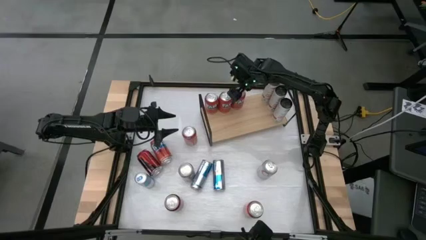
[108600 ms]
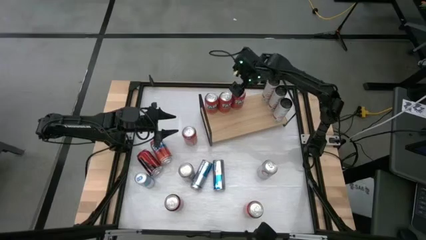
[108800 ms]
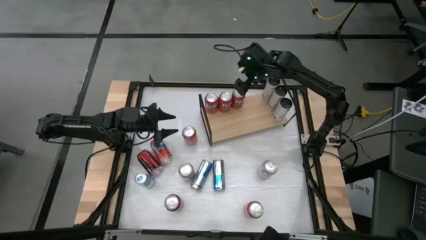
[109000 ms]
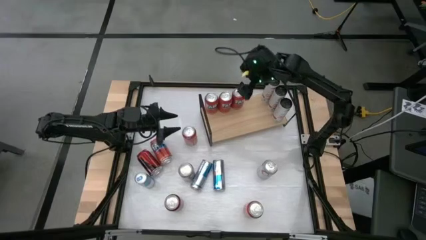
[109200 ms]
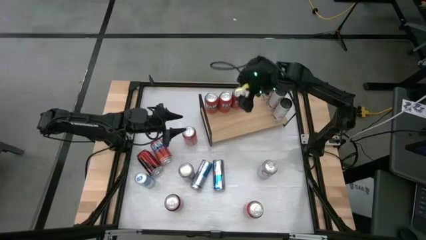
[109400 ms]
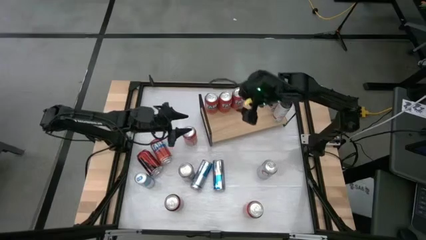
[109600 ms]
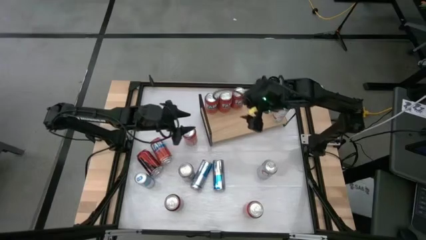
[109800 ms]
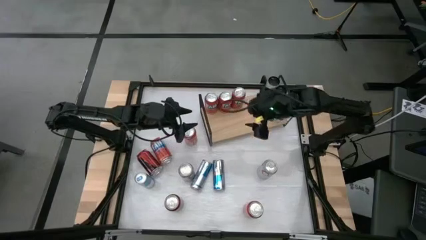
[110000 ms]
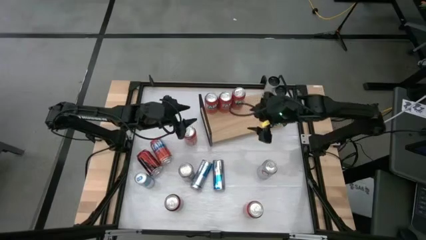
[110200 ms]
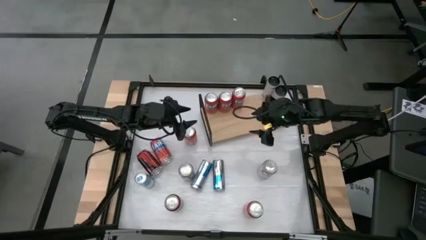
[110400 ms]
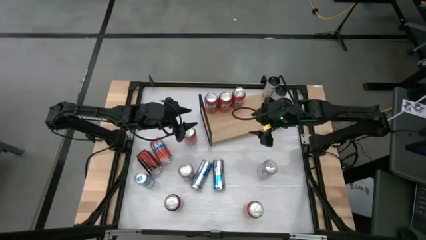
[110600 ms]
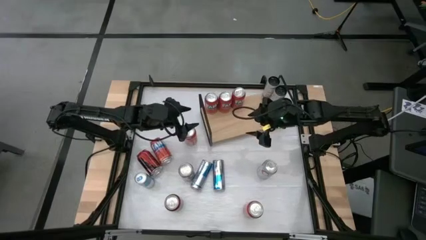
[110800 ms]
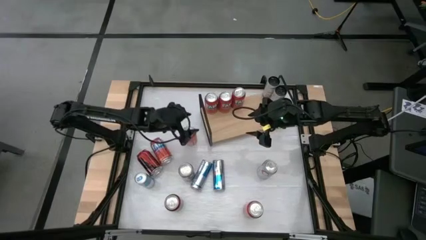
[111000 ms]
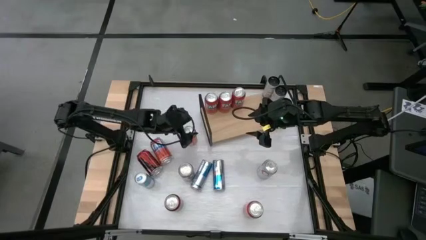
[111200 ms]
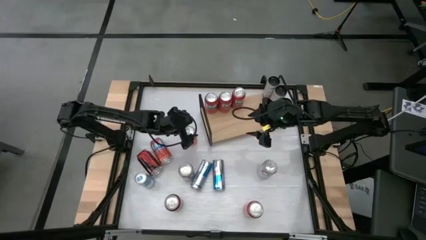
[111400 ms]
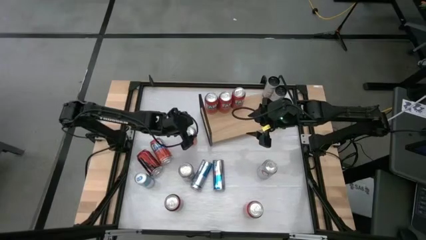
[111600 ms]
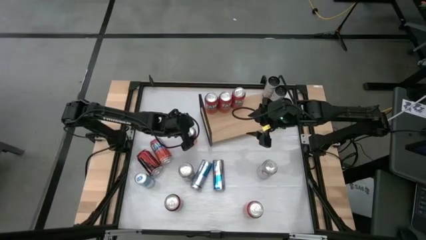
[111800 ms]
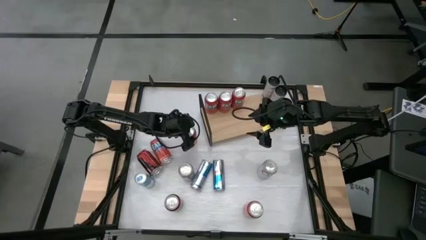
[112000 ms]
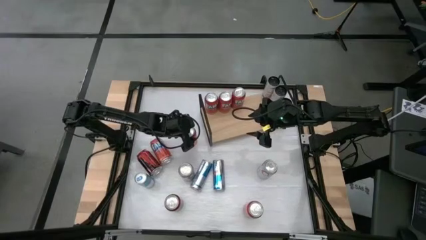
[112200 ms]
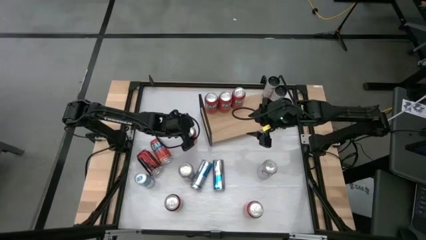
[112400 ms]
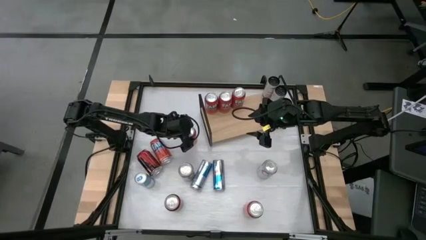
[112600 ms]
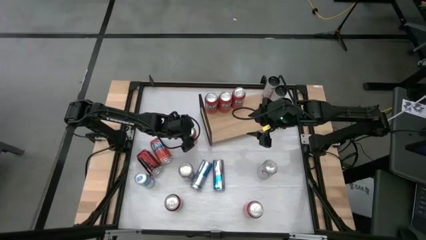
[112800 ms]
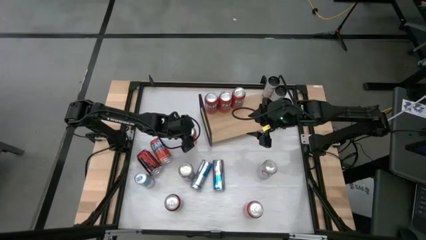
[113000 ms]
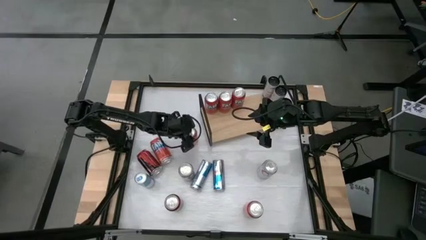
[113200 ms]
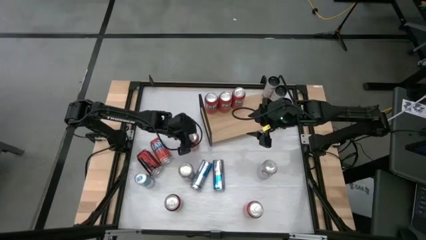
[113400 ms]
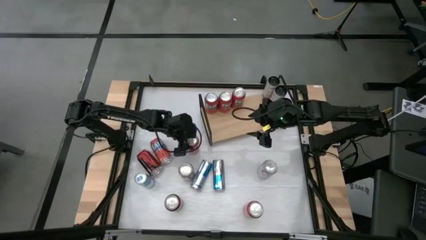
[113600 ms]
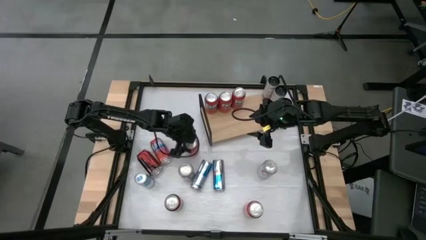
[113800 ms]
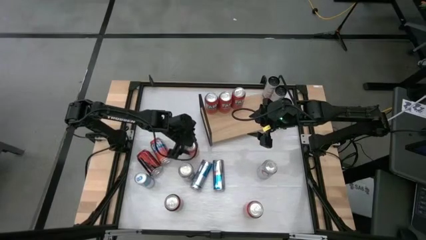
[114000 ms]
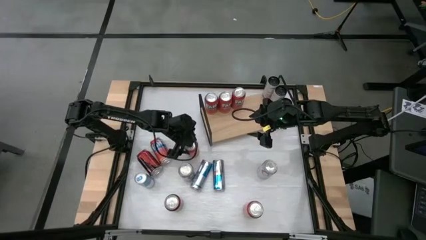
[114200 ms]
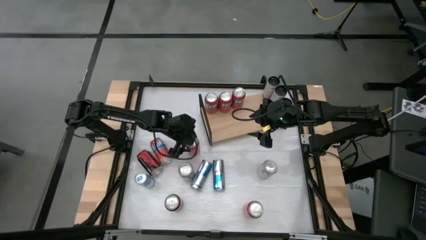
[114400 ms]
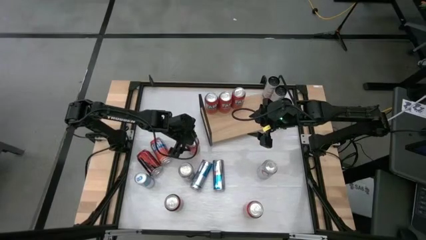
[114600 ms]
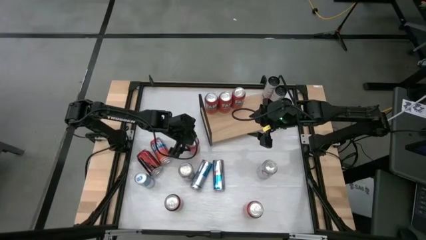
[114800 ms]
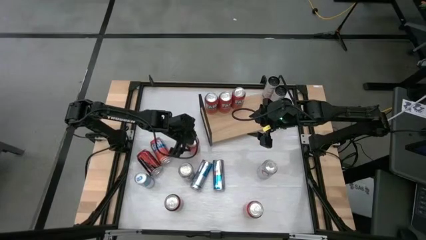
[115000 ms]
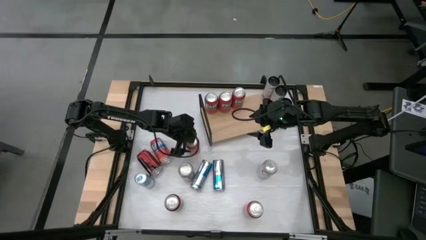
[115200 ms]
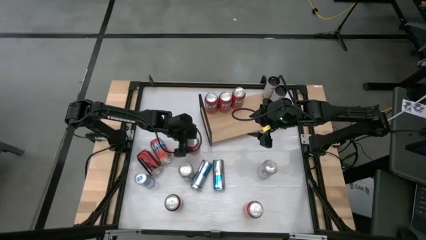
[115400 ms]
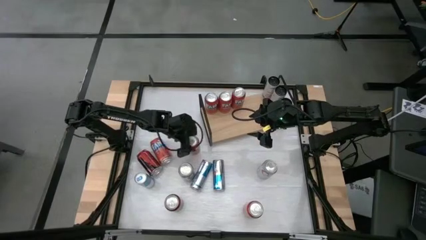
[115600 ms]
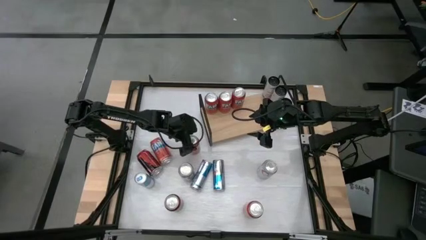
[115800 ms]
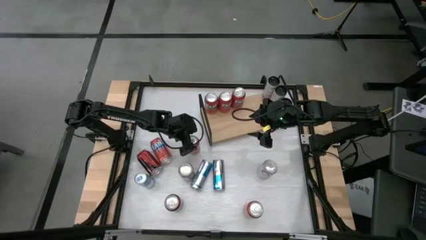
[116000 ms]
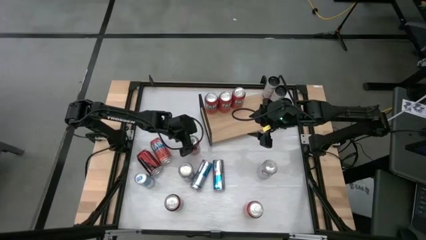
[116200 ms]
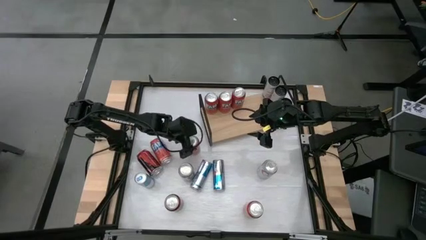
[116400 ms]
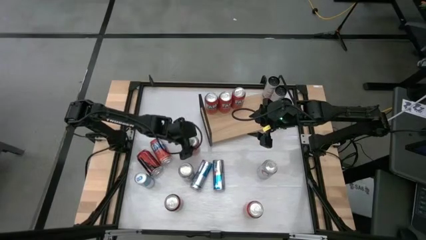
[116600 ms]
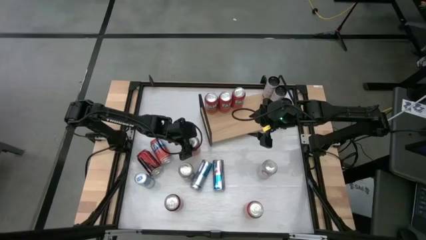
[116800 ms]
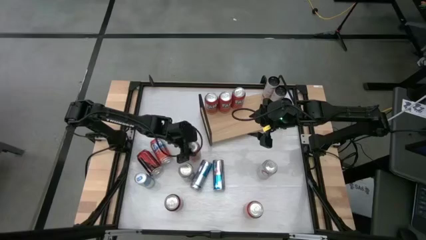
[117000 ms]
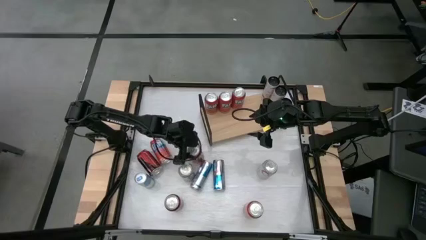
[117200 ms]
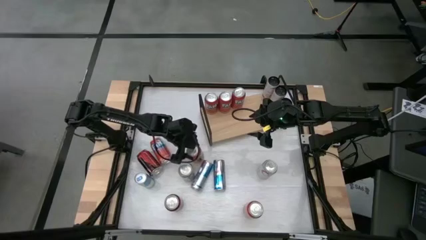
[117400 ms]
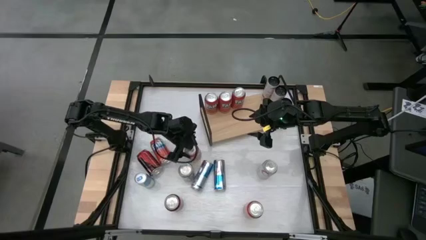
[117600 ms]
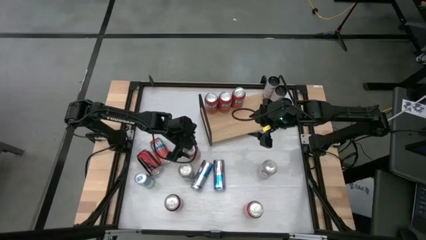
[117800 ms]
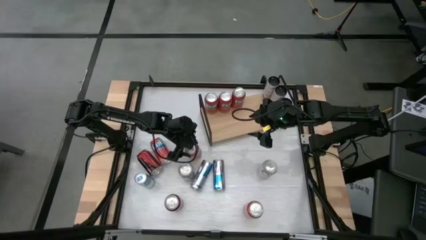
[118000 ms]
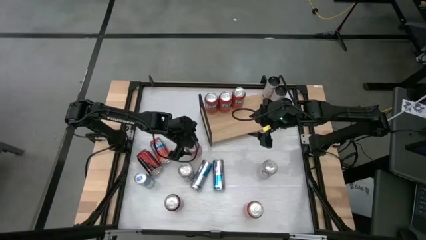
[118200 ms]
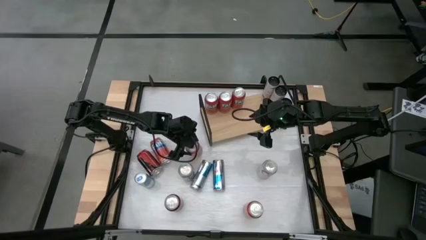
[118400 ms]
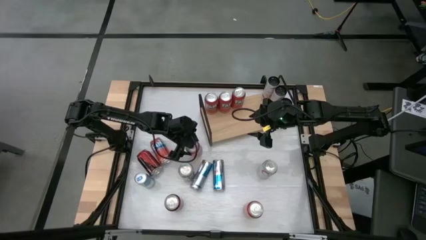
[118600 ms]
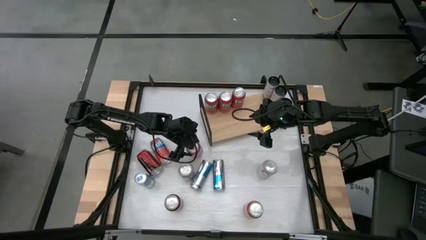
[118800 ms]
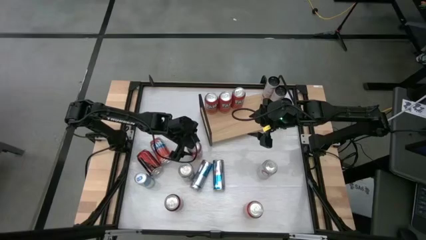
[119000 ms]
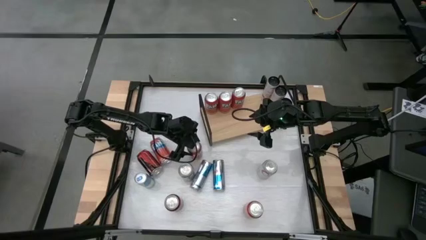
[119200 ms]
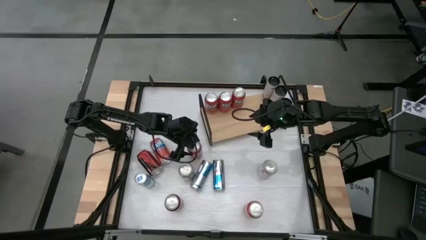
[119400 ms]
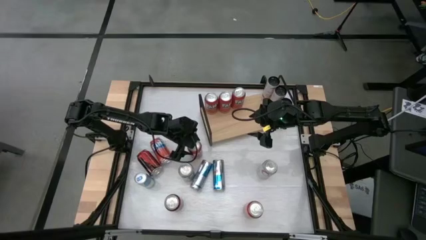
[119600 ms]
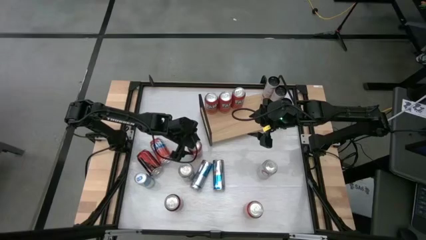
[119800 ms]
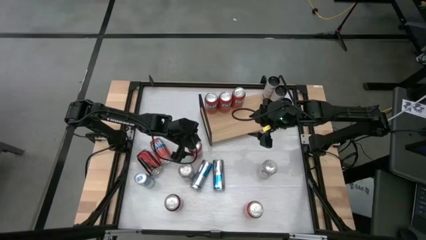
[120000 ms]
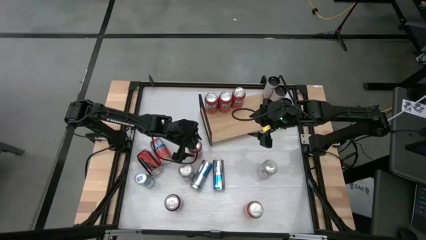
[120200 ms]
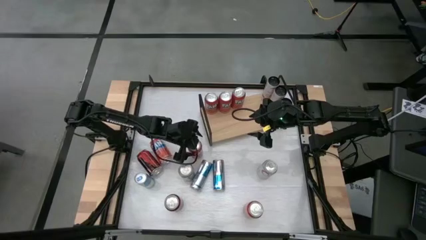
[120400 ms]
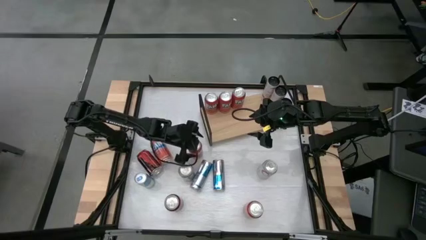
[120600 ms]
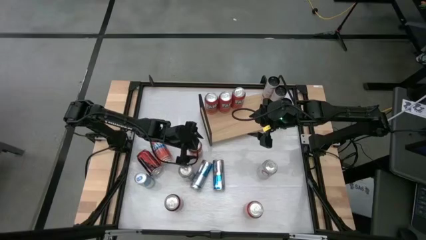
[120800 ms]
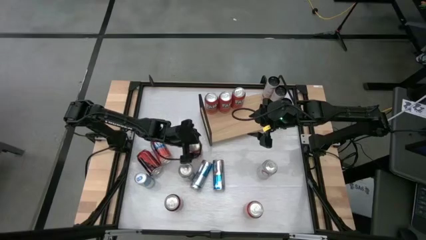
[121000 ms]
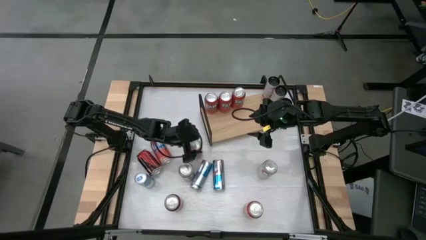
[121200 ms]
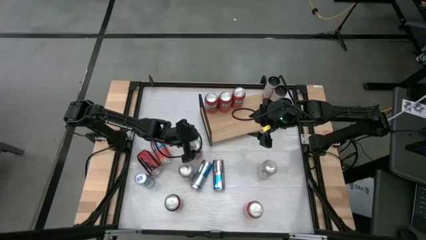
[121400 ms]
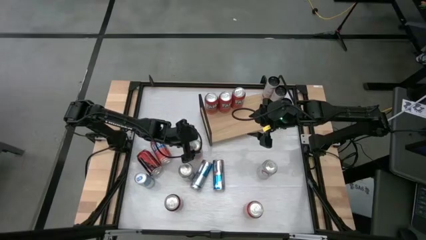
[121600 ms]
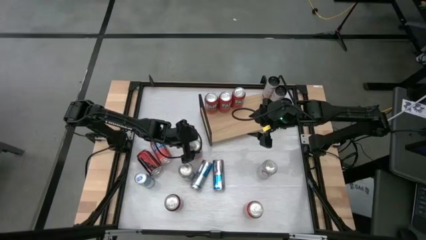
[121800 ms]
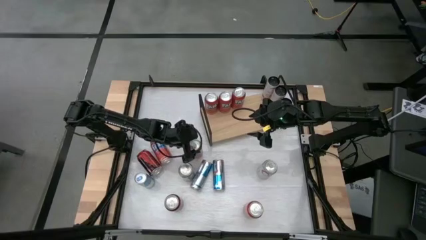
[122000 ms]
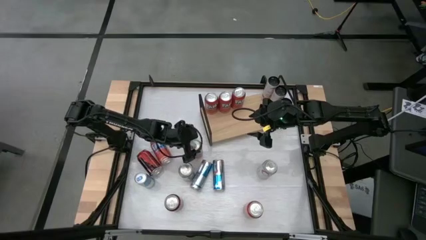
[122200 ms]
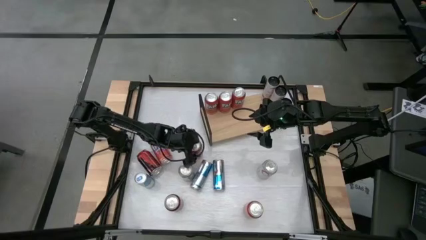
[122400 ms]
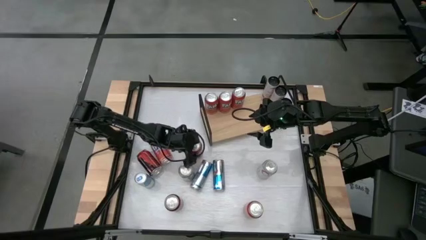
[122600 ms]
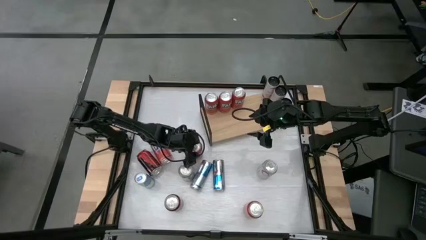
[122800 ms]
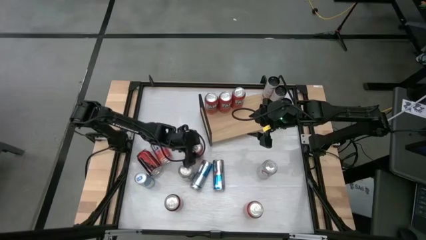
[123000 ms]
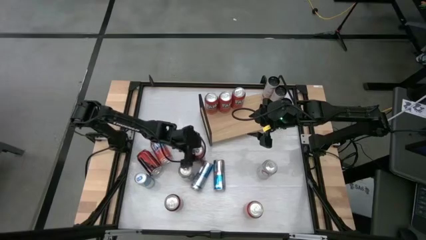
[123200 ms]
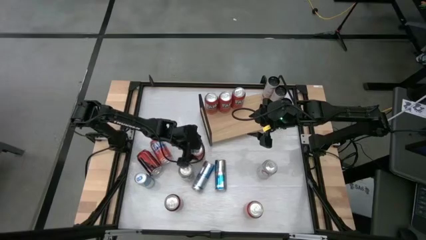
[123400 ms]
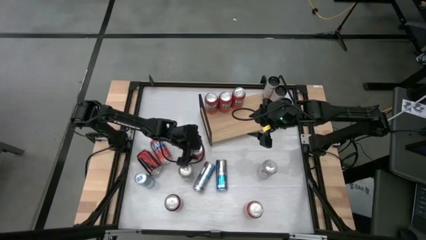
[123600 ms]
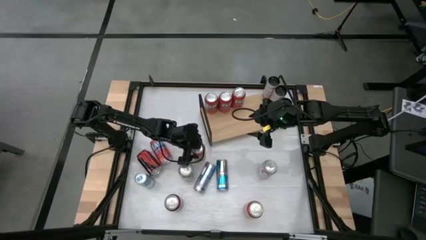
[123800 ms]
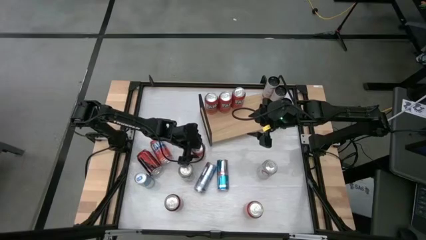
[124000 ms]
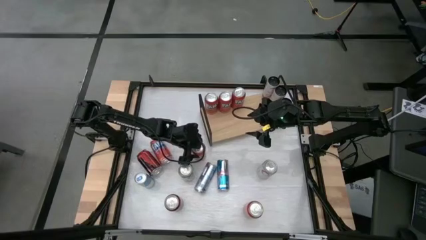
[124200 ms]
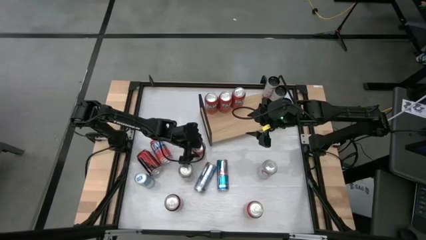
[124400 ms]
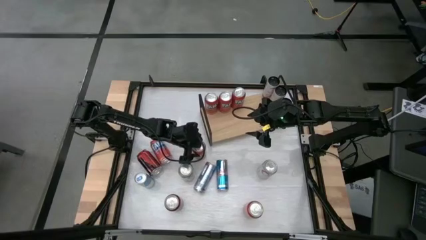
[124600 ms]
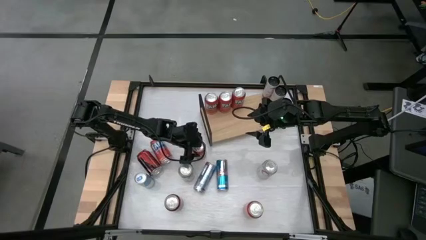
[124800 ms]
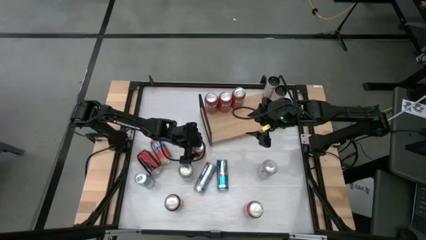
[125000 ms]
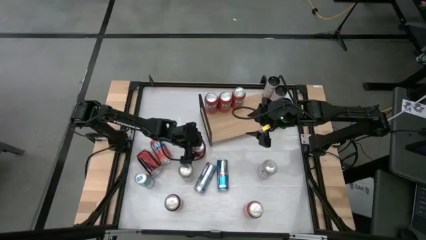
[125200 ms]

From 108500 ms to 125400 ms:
Task: Place canned beverage on shelf
Put the center orange soda can on the shelf
